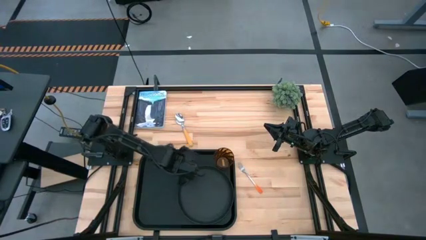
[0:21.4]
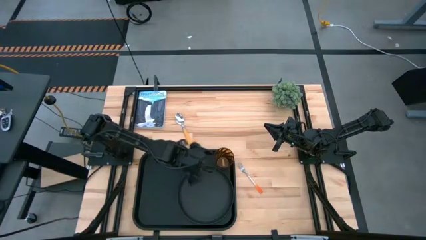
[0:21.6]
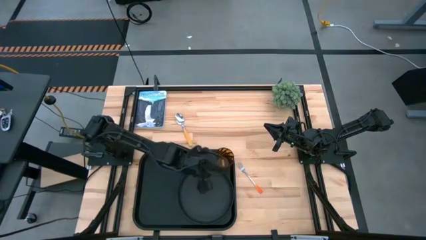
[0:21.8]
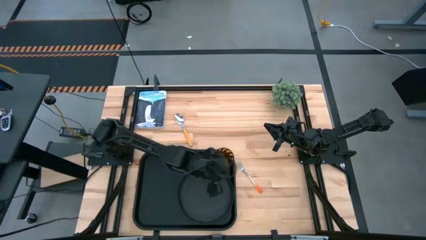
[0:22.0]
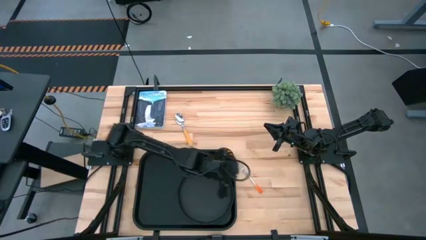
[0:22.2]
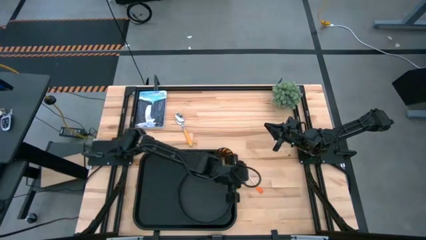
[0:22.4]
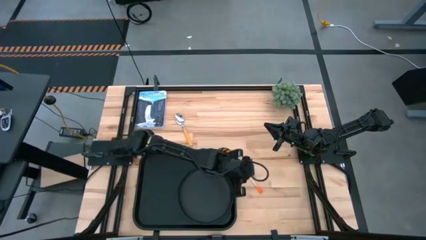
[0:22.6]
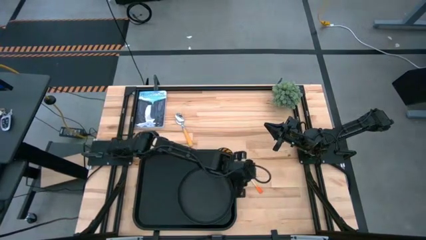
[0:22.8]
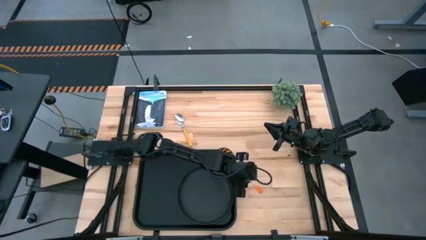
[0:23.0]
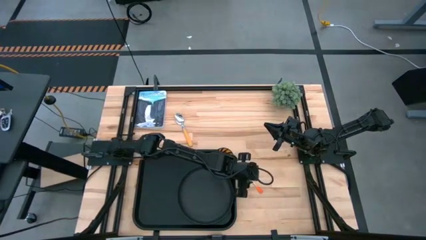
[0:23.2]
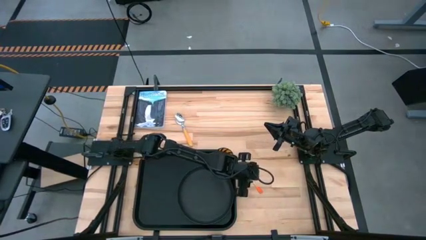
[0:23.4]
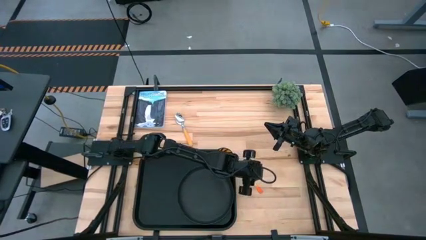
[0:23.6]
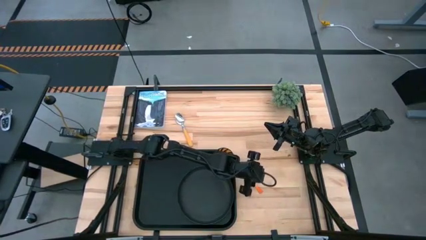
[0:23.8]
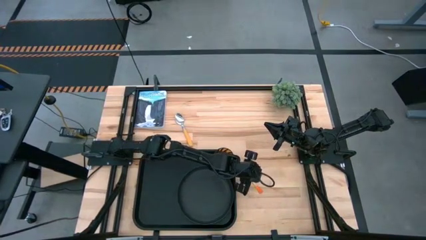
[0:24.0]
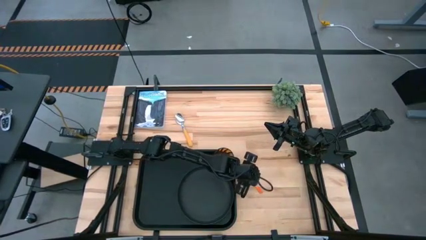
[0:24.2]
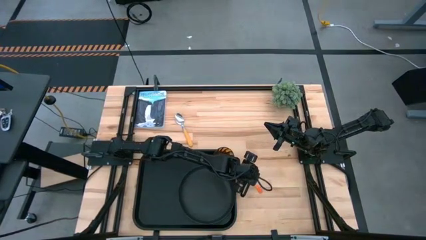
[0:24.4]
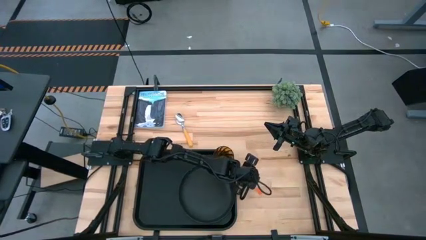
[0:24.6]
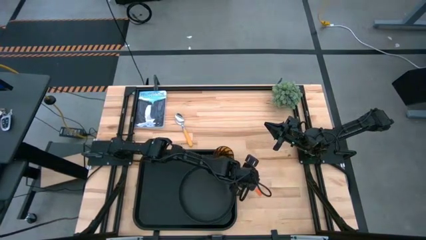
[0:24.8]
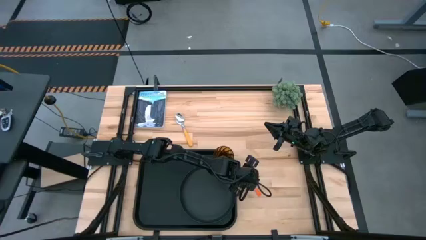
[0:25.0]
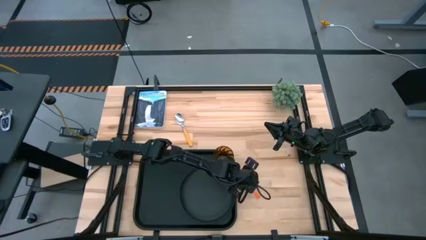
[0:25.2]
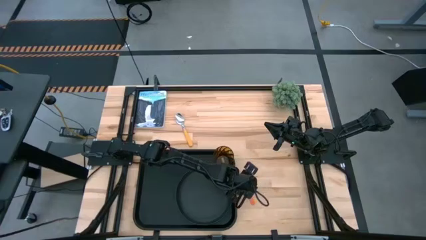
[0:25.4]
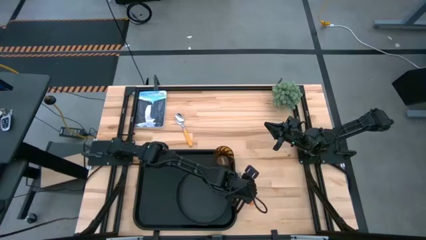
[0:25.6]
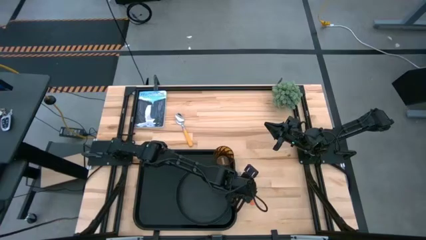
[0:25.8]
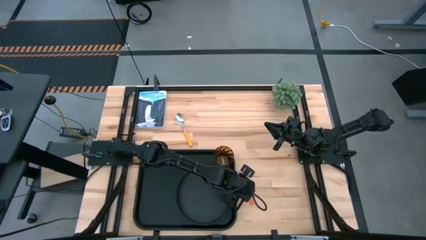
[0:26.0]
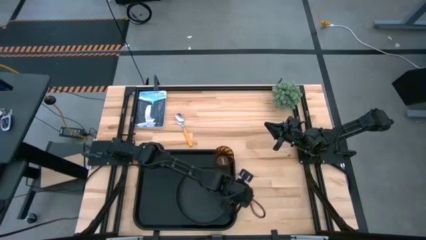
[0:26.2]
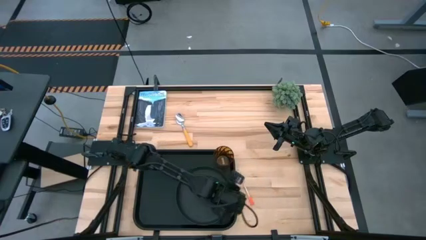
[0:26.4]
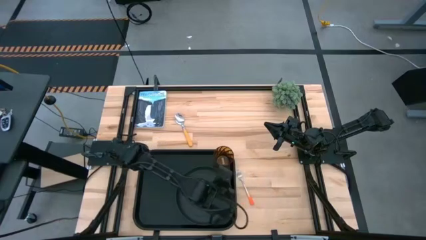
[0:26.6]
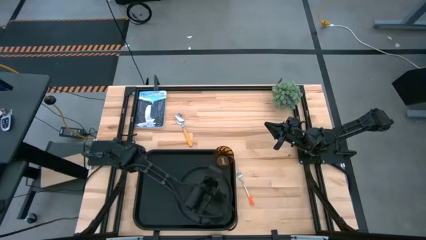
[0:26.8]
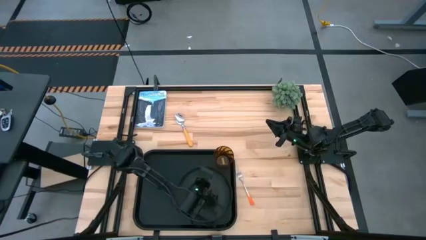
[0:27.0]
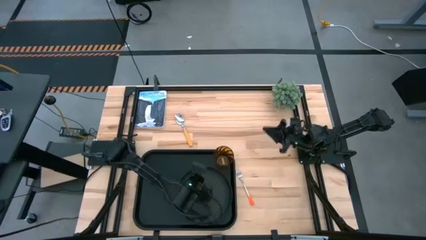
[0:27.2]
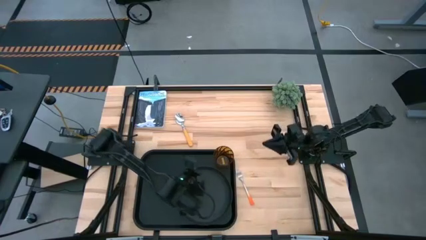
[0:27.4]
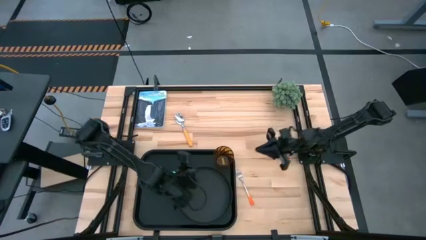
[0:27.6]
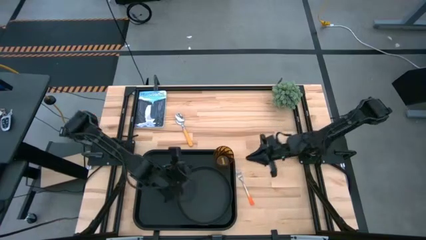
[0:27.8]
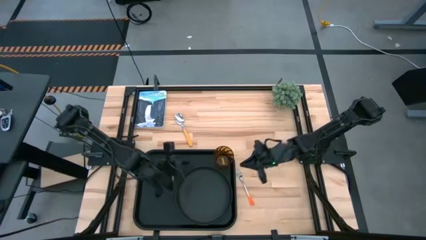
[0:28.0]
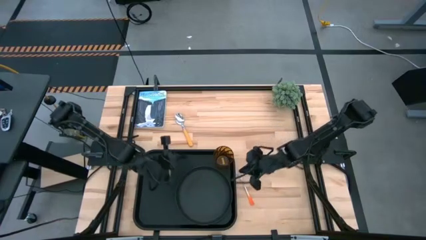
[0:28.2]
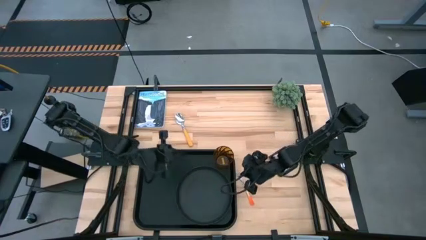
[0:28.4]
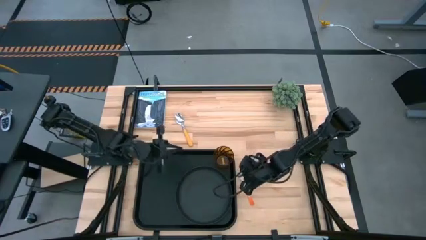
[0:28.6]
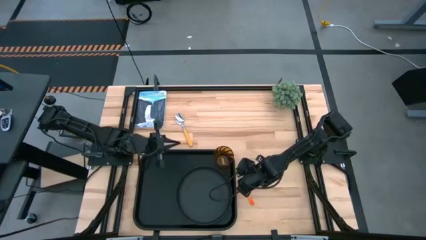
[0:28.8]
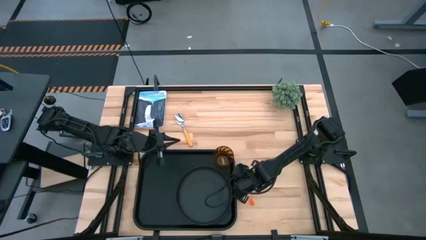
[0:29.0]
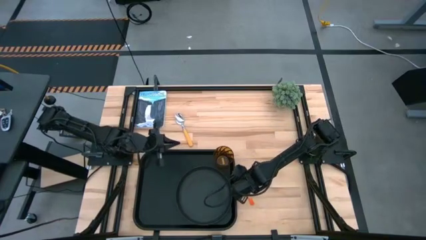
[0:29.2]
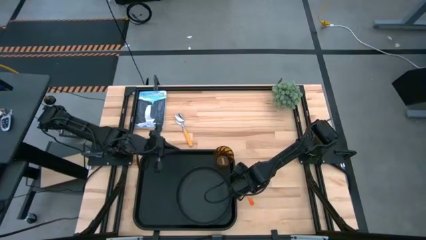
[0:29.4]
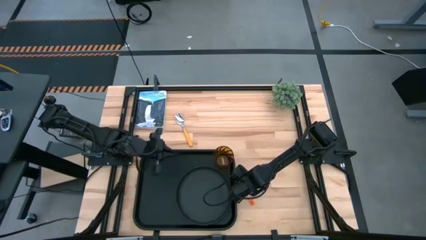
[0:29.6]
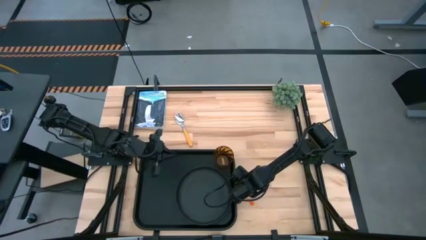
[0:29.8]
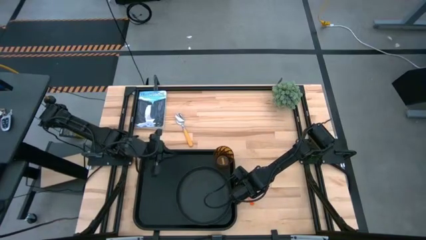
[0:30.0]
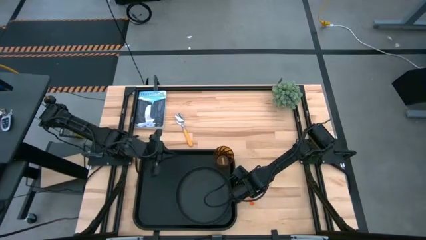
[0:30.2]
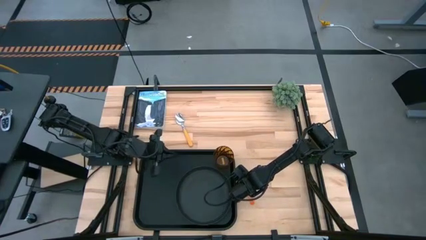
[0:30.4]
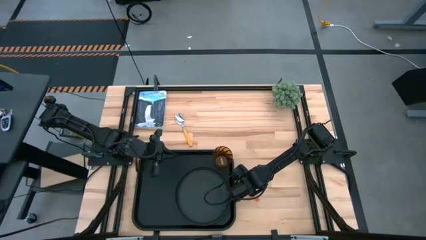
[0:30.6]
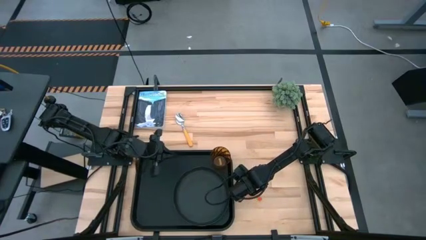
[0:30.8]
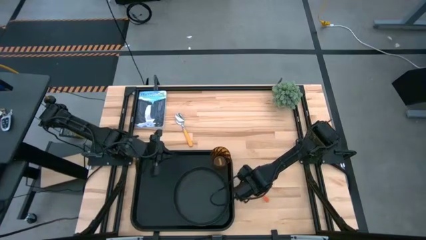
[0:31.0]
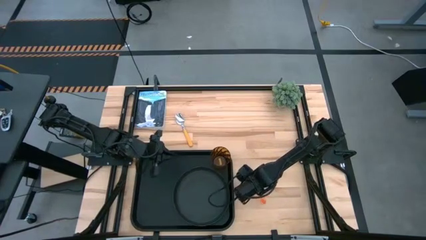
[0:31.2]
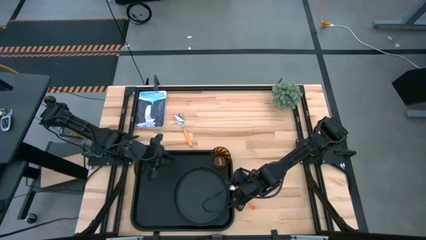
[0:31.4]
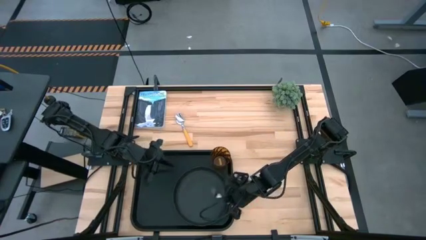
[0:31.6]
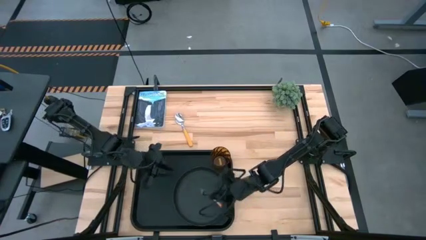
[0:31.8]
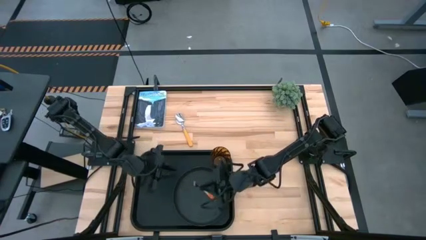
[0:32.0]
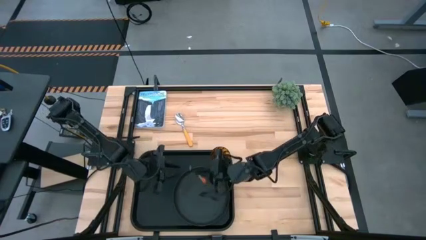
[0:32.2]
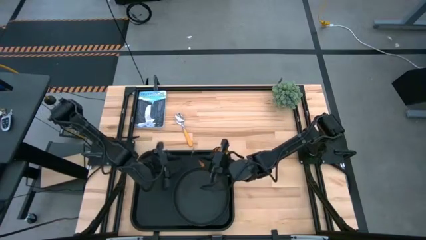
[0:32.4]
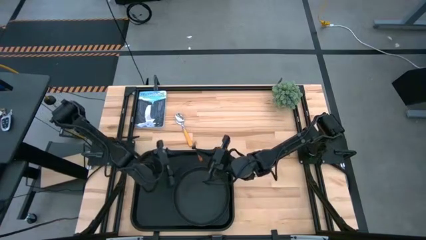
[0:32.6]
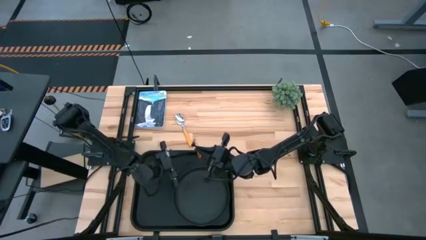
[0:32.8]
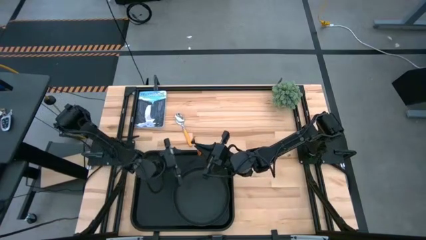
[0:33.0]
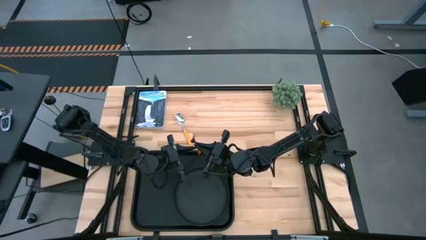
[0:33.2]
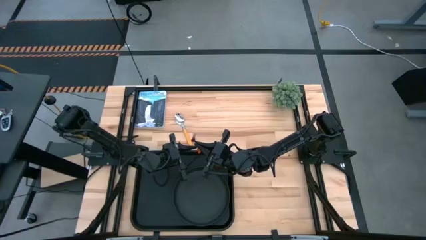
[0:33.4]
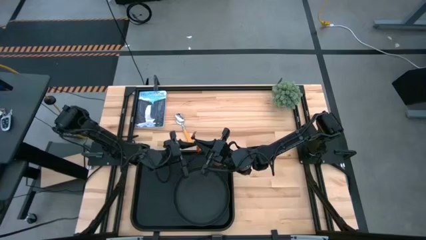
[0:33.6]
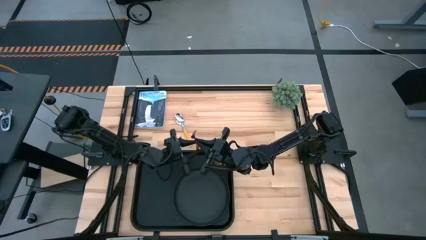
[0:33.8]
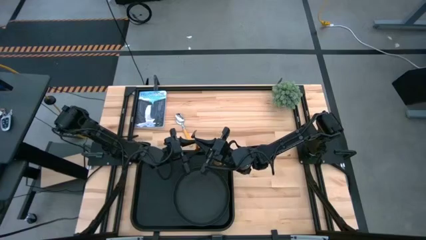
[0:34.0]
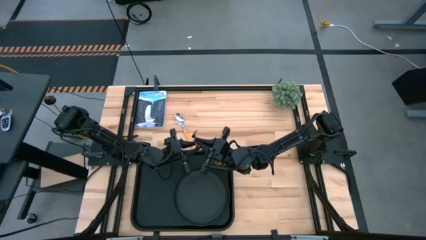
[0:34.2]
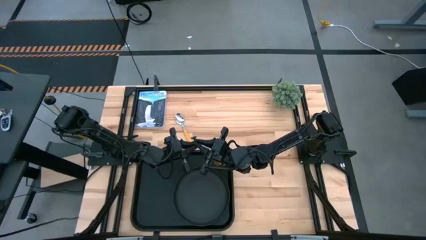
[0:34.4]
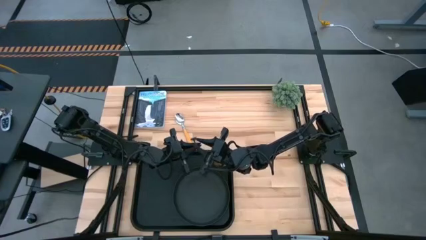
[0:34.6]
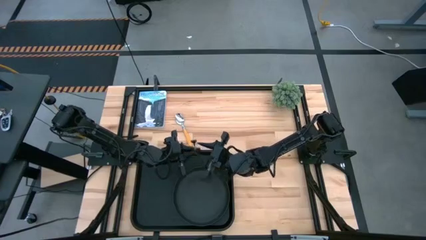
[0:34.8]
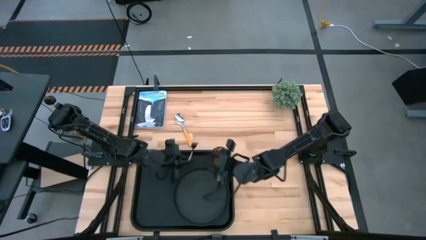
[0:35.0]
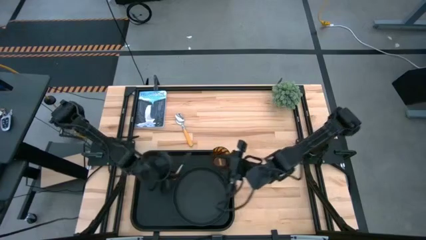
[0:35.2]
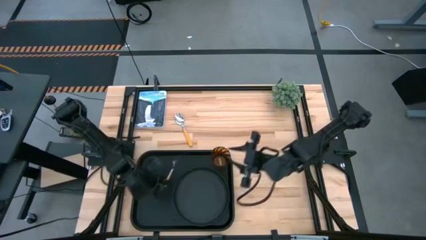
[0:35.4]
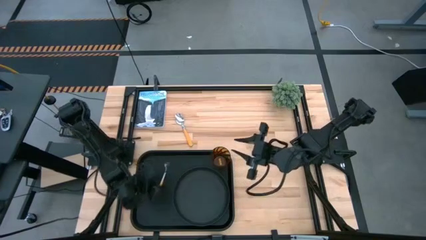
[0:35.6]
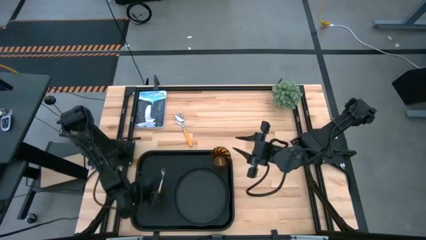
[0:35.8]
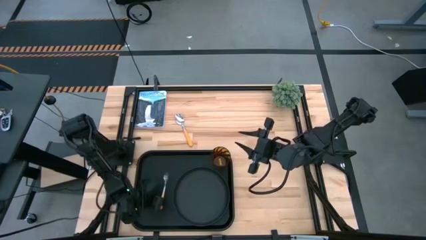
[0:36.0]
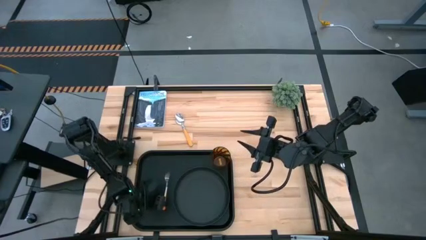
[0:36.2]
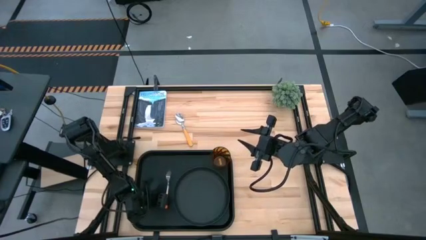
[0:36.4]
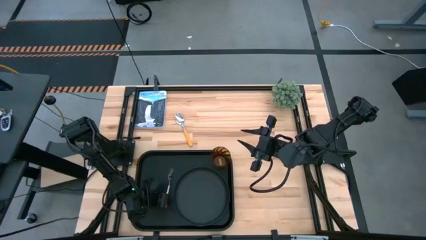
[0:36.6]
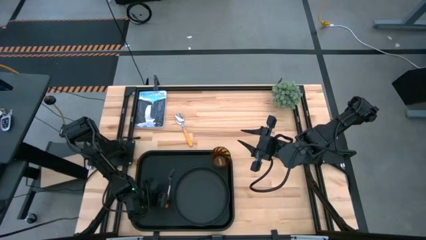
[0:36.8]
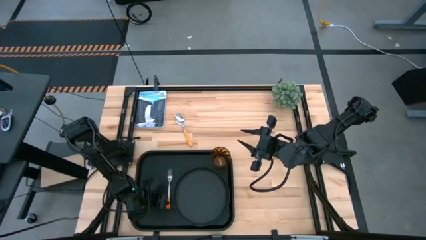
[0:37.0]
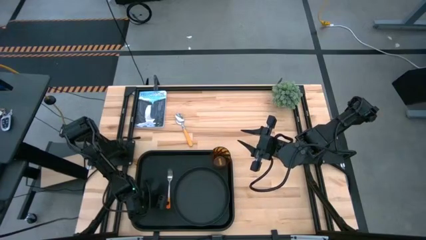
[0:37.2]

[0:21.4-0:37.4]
Task: Pick and place plate/cup/fork/spoon on tray
Put the orange fork to the left of the black plate on the black tray
